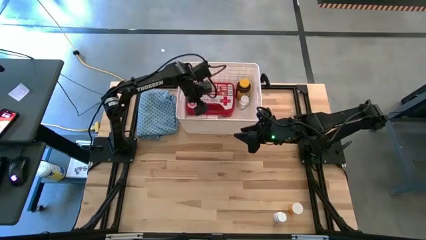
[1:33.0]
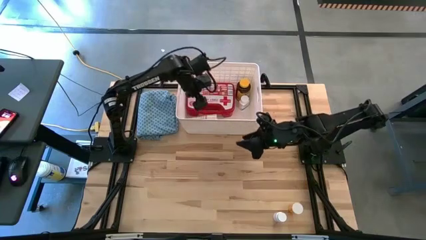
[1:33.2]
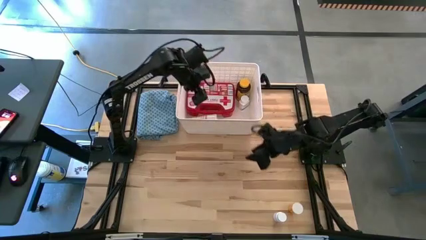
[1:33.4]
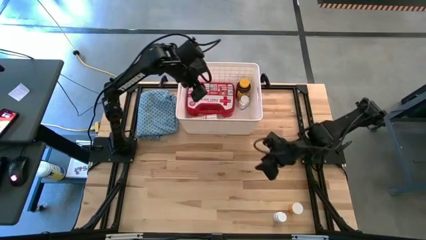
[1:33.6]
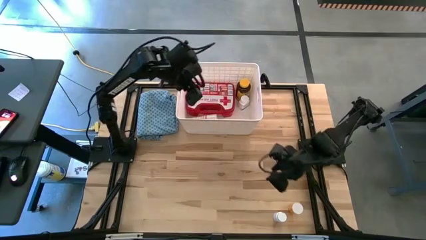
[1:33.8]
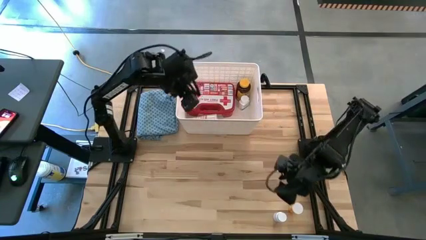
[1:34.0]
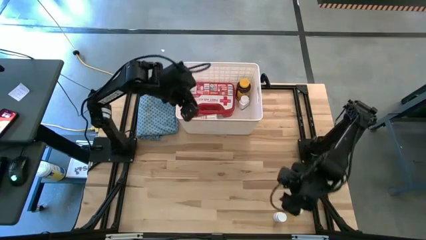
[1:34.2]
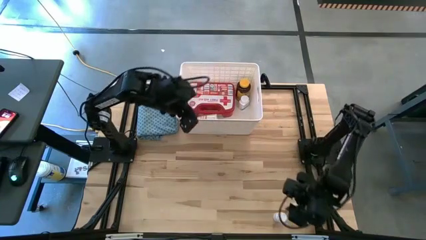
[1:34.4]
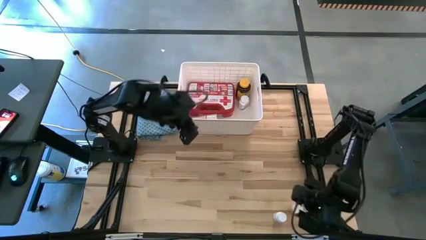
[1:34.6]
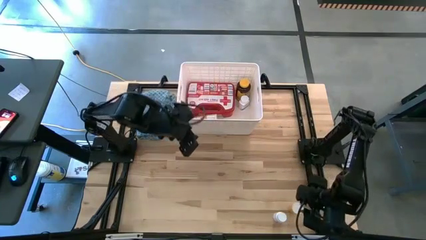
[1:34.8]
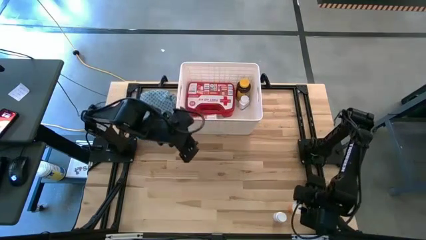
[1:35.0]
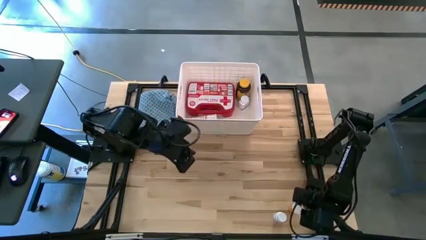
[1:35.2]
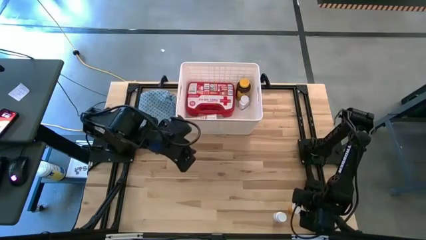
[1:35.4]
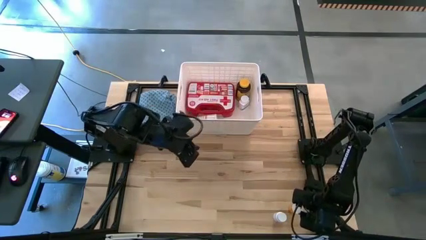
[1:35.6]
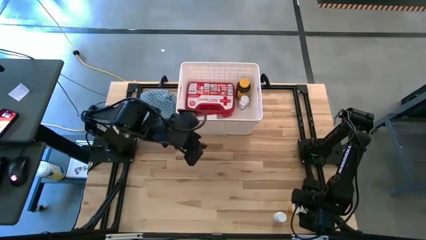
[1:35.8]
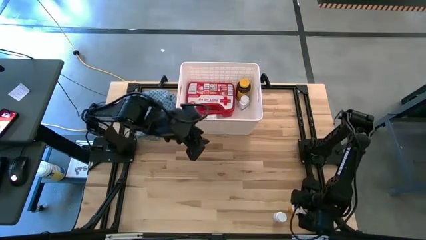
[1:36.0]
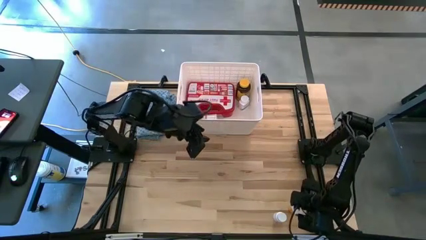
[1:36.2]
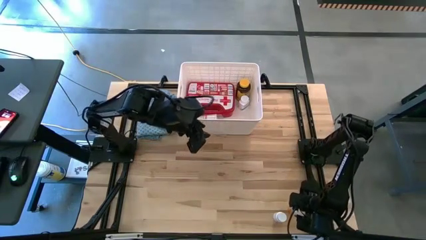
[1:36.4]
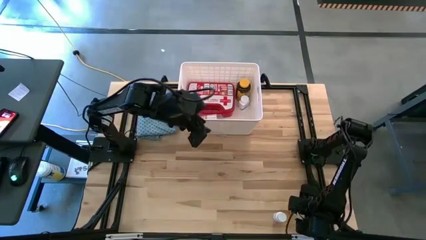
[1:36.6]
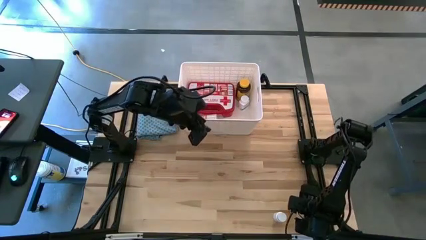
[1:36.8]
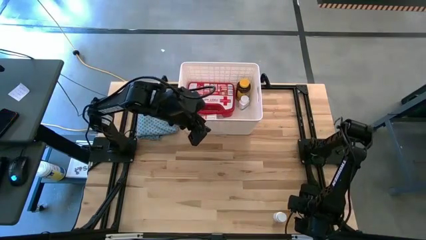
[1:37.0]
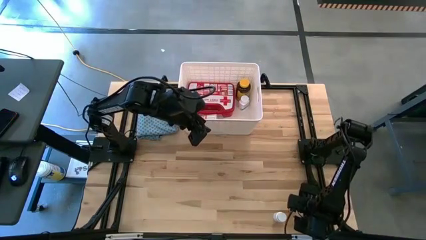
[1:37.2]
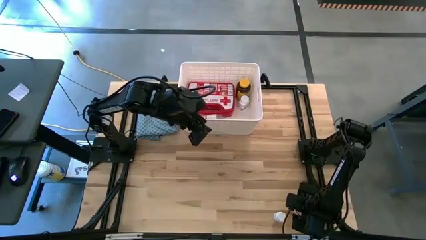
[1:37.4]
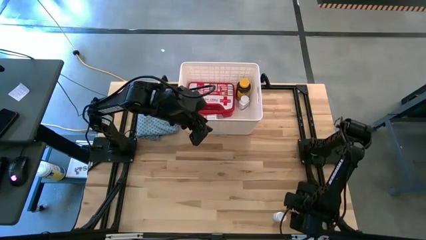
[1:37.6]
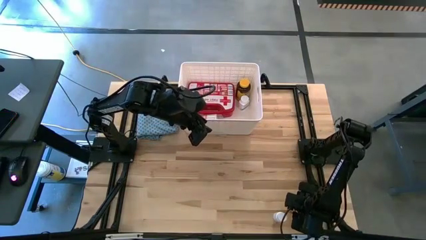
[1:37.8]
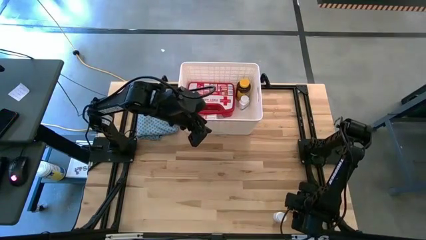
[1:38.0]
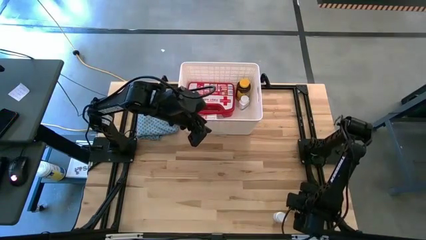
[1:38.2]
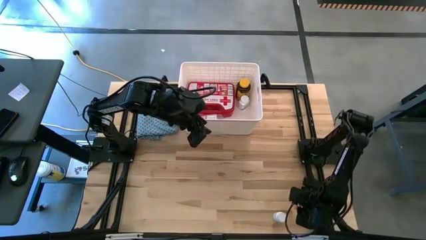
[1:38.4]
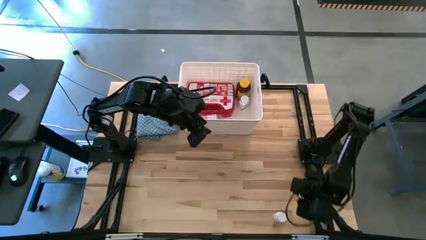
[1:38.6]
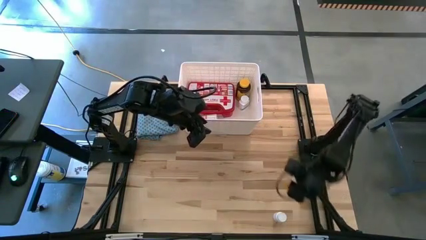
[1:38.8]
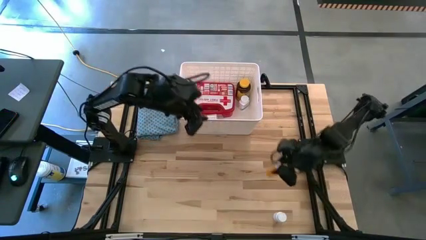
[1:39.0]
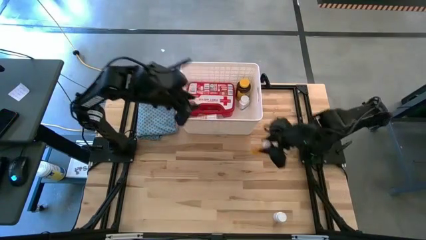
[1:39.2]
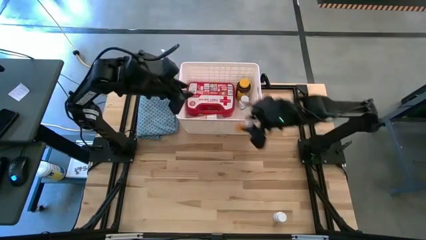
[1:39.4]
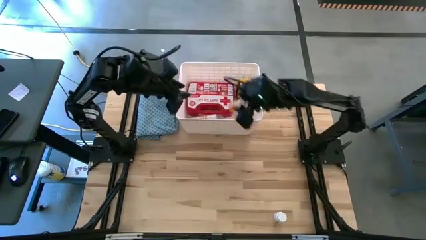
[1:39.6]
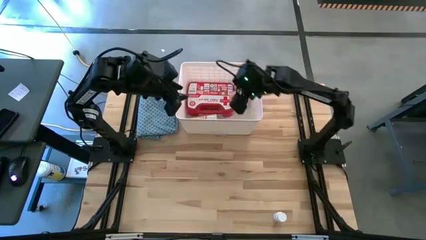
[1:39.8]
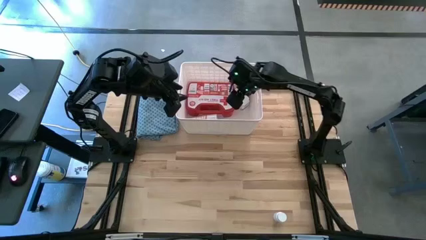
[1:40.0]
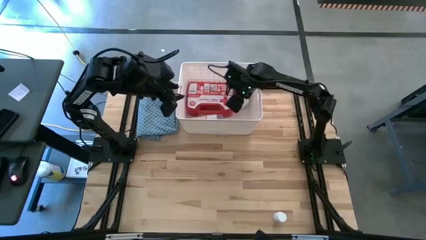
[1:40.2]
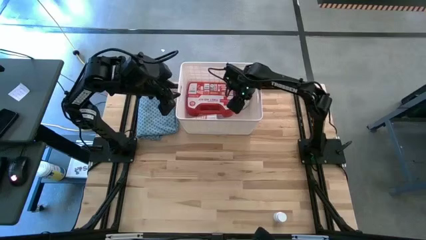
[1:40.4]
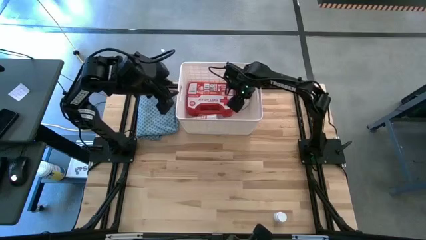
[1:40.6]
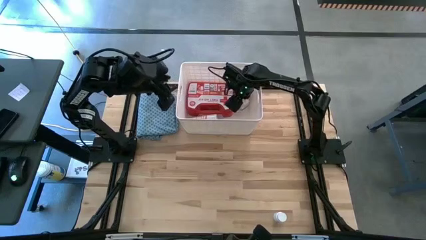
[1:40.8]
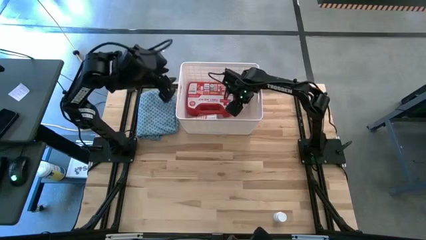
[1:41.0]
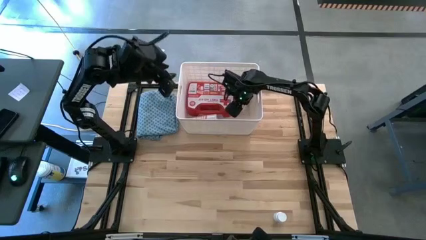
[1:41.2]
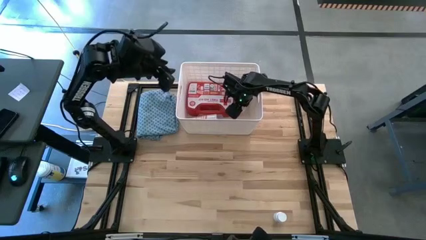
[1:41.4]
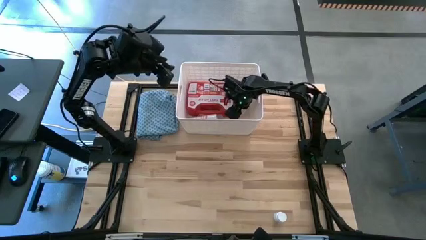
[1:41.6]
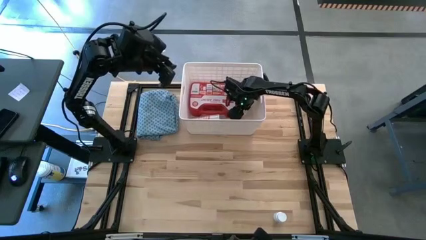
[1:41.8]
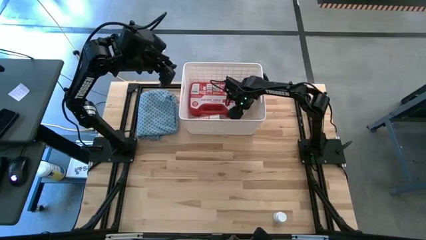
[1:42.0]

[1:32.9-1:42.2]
Task: Pick & place medical supplies in basket/bin
Put the orange pill bottle into the white bin

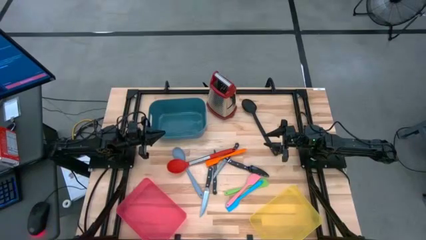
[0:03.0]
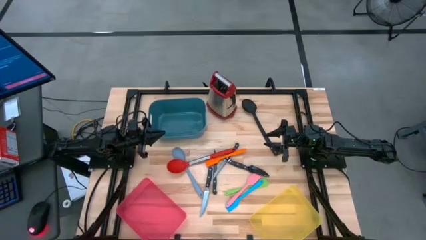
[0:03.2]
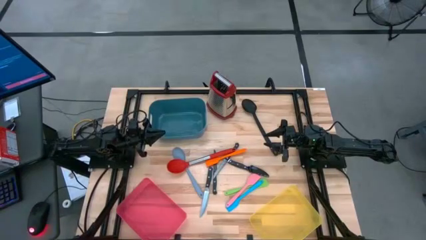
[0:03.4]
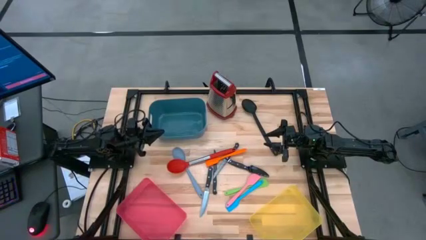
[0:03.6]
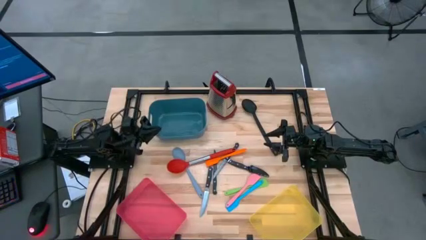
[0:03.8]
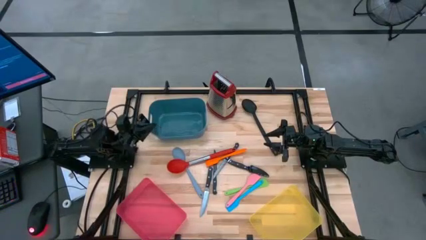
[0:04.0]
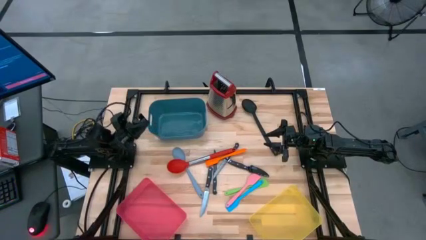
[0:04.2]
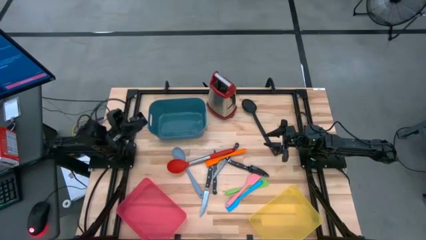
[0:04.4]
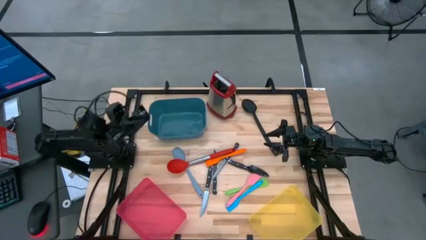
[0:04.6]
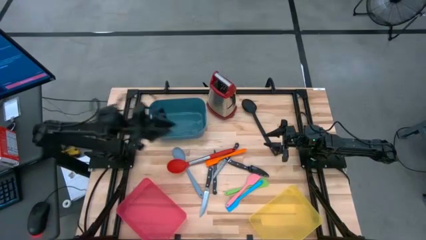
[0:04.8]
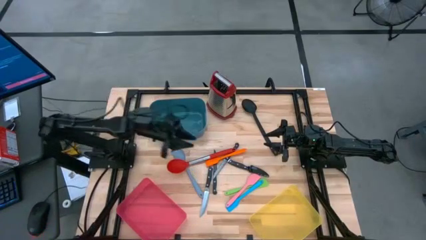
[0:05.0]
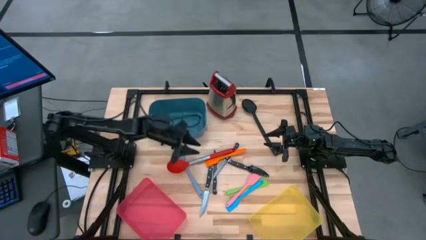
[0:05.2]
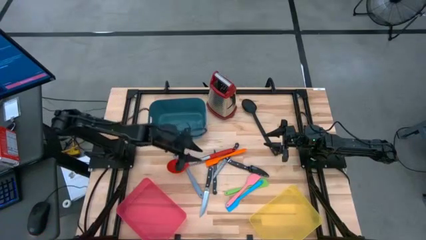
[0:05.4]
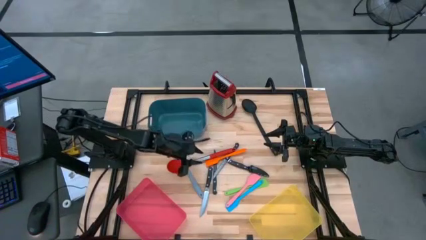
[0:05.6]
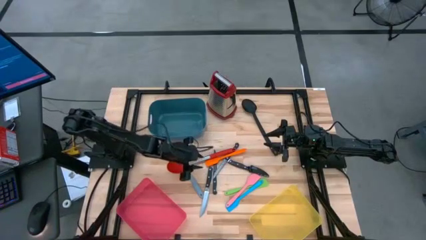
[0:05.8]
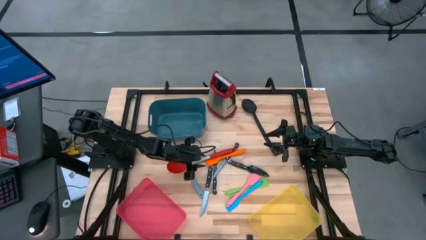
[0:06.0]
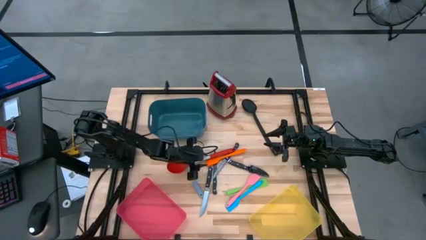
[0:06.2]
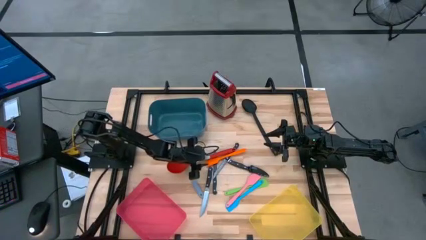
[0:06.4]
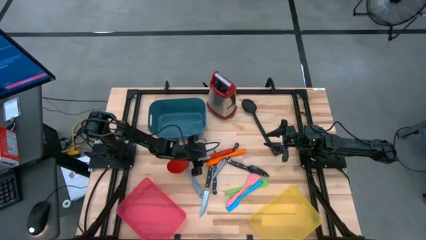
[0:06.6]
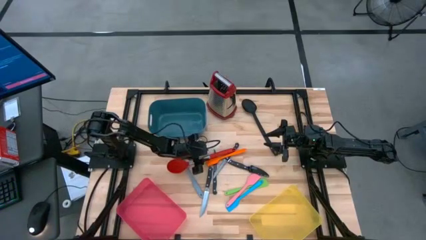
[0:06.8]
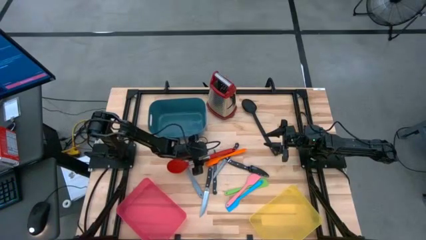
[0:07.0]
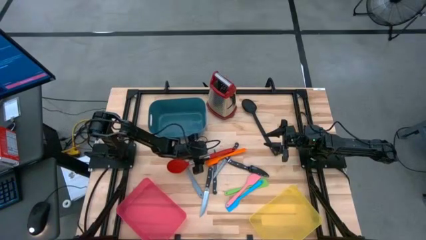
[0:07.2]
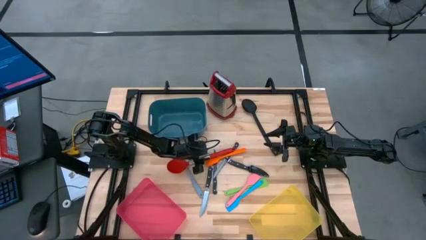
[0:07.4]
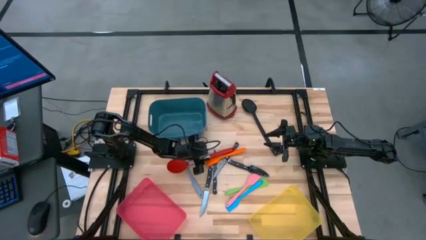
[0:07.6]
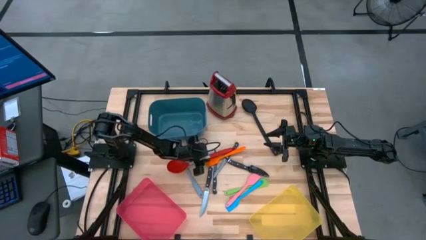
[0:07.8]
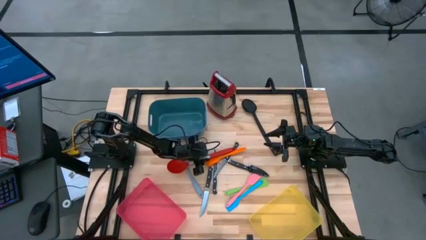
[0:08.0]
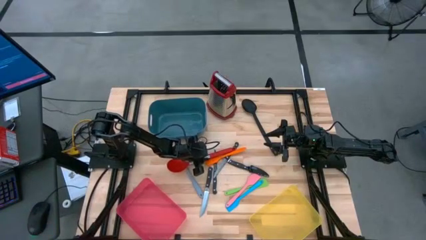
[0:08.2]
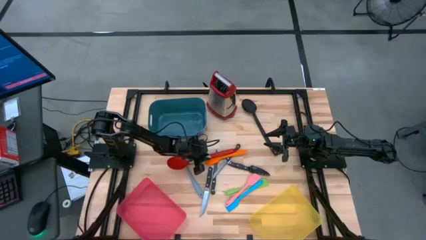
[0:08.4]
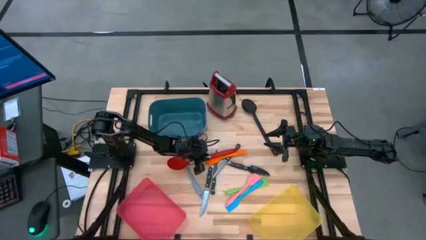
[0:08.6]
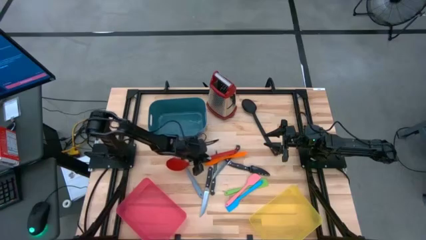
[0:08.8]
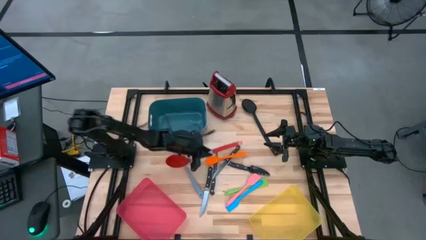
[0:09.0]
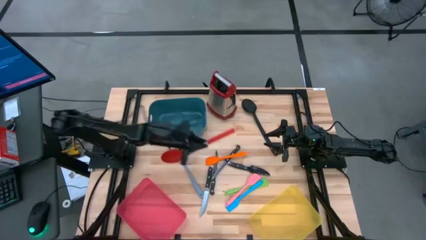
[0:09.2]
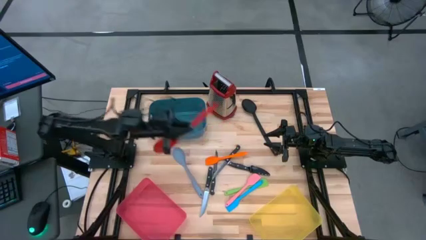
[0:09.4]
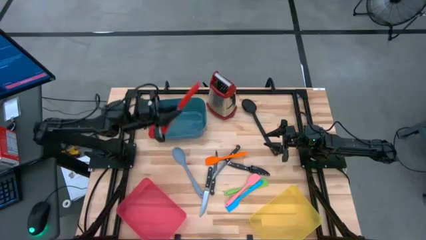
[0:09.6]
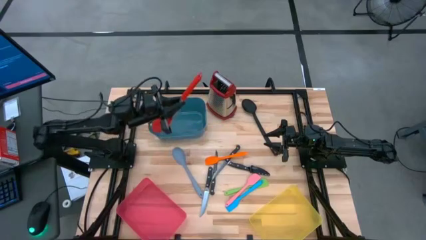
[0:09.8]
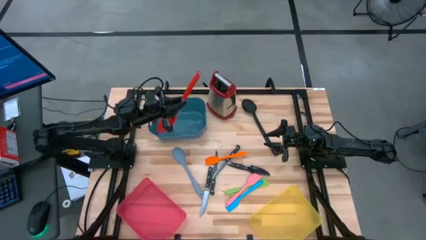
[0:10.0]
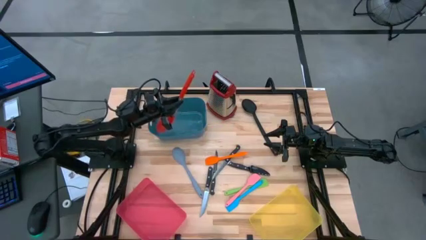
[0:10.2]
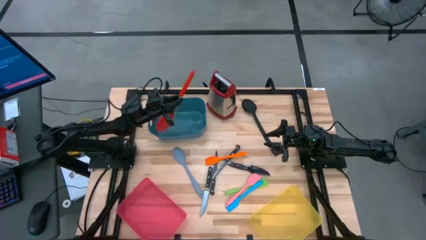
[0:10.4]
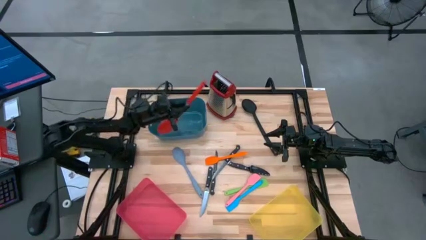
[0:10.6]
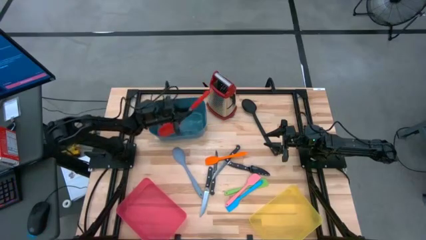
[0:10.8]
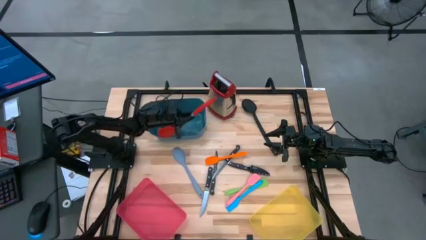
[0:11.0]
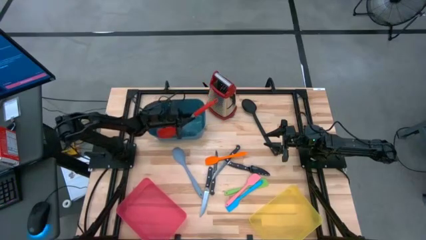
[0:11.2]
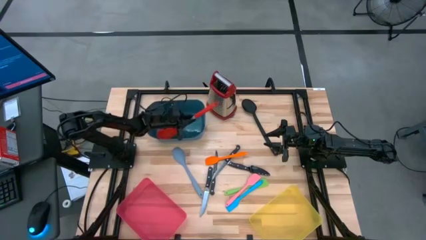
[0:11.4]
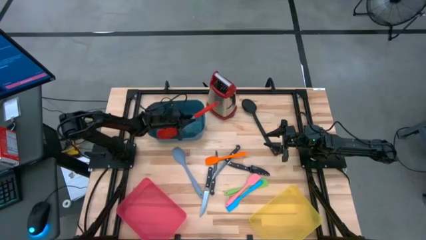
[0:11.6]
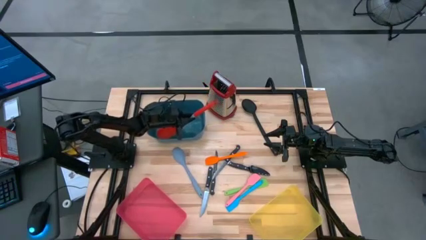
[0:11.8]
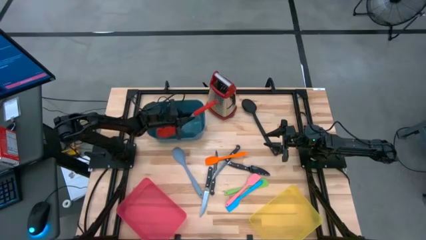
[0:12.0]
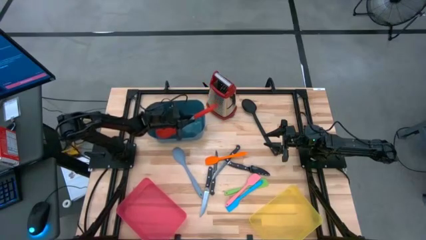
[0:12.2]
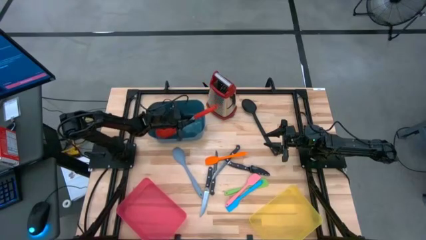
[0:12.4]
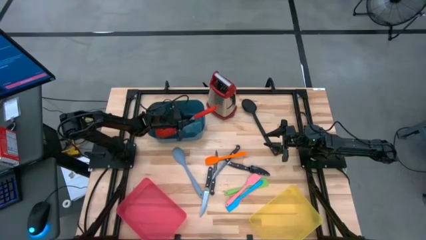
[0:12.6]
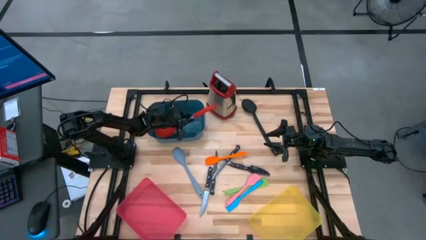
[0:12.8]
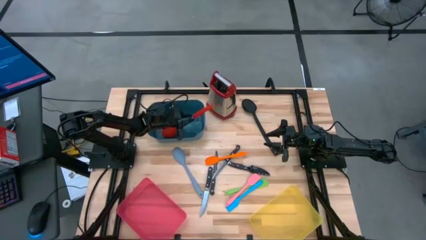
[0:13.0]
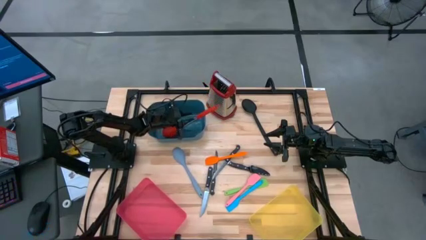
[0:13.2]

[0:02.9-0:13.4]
Task: Pick & Place Kitchen Items
Put the red serving spoon into the blue bin
